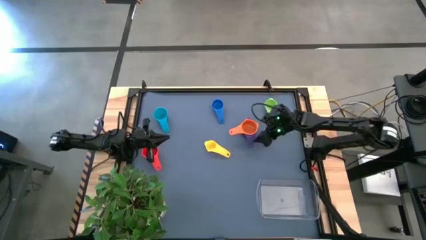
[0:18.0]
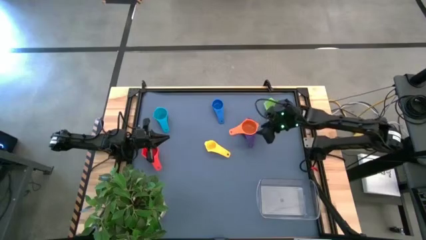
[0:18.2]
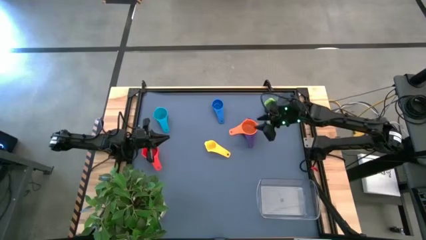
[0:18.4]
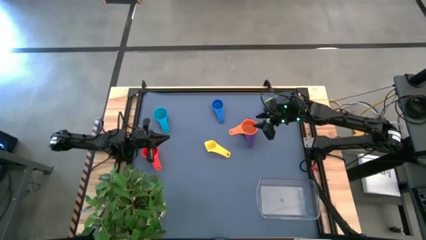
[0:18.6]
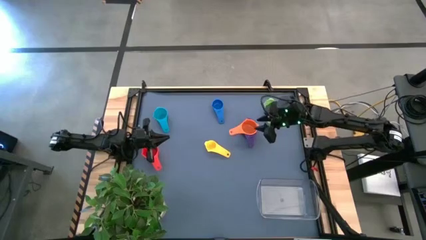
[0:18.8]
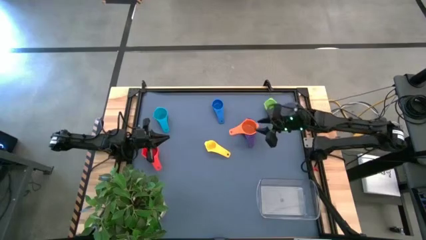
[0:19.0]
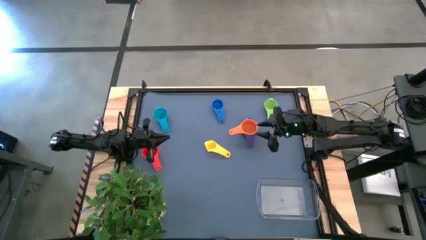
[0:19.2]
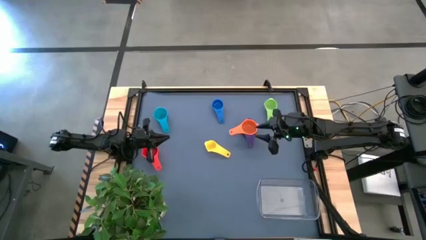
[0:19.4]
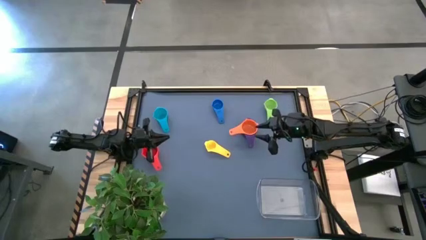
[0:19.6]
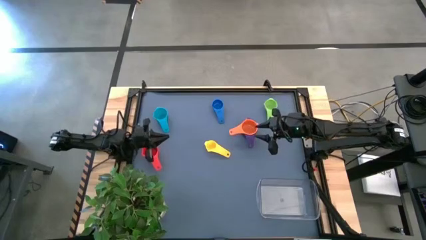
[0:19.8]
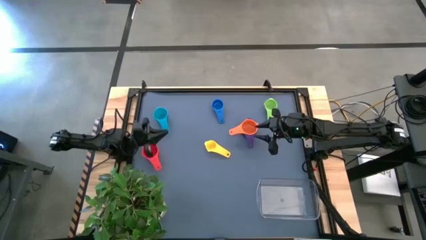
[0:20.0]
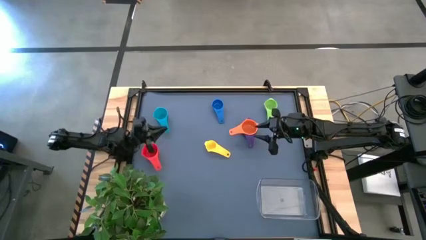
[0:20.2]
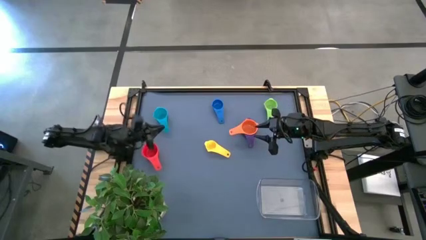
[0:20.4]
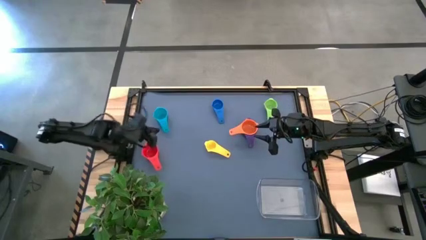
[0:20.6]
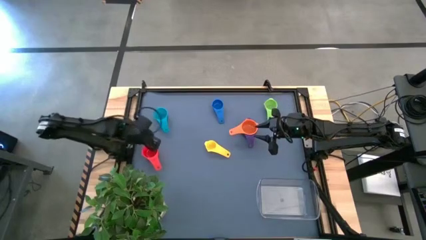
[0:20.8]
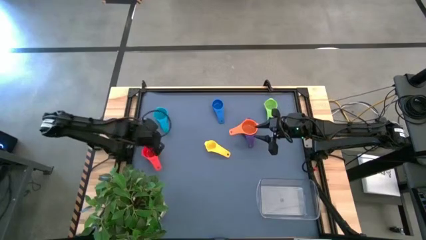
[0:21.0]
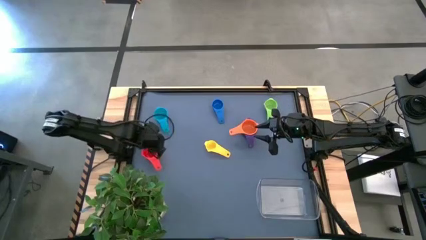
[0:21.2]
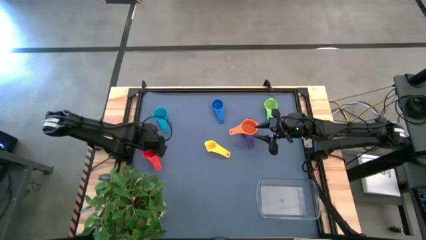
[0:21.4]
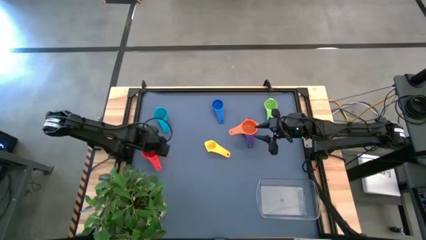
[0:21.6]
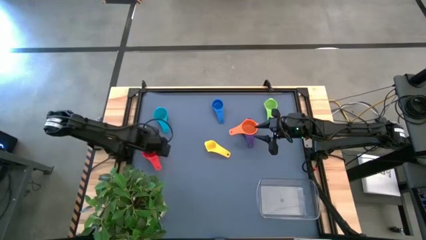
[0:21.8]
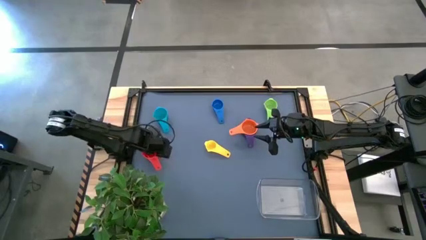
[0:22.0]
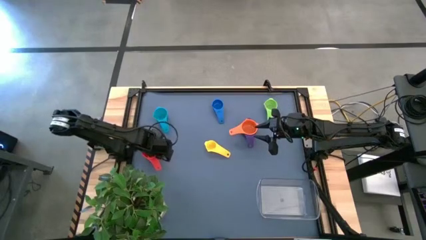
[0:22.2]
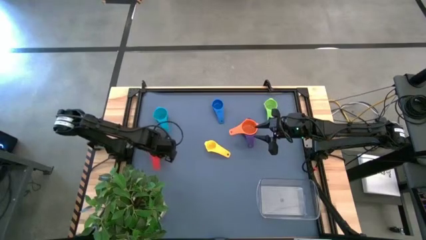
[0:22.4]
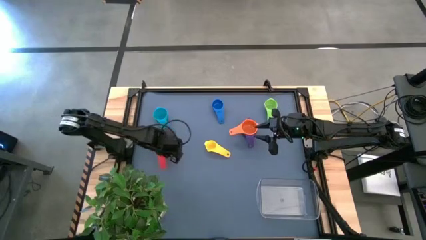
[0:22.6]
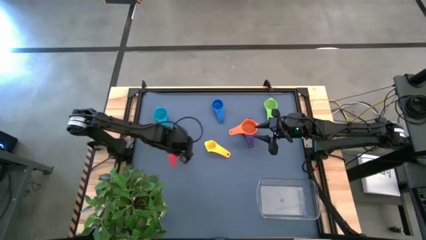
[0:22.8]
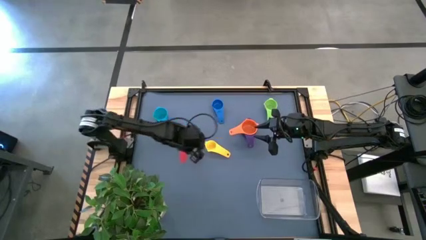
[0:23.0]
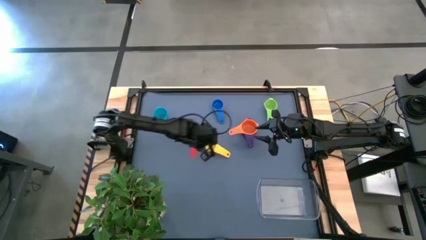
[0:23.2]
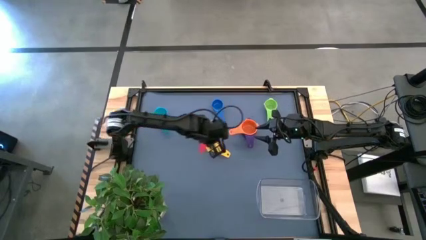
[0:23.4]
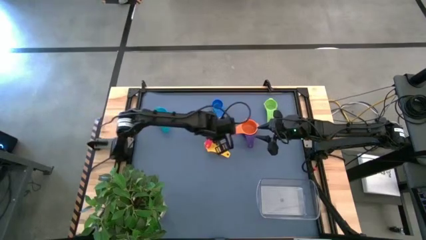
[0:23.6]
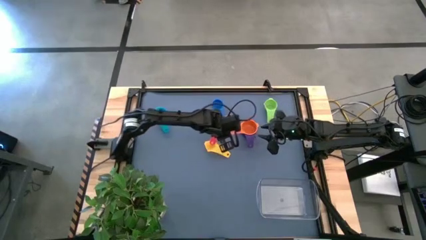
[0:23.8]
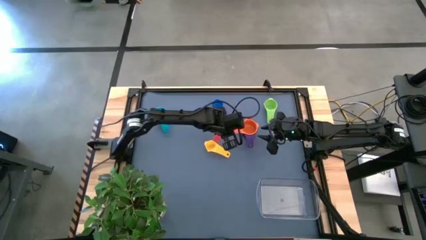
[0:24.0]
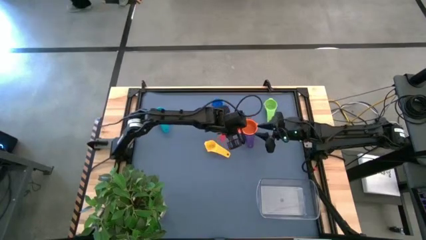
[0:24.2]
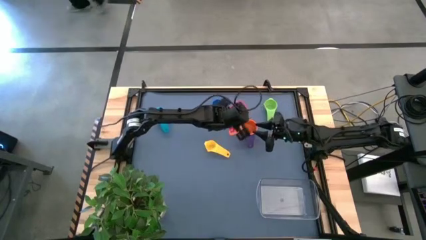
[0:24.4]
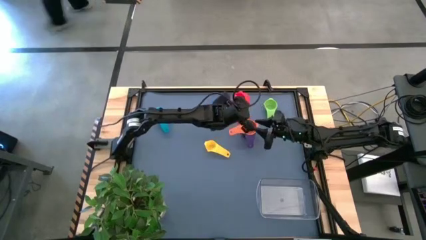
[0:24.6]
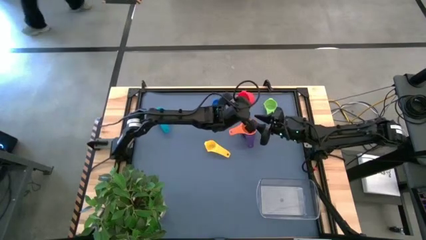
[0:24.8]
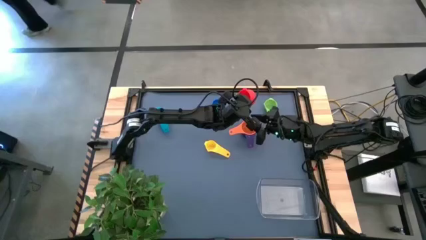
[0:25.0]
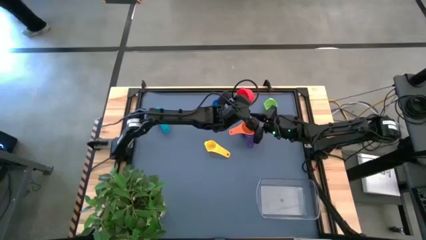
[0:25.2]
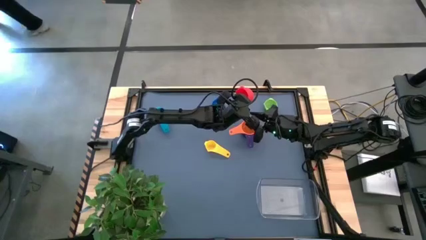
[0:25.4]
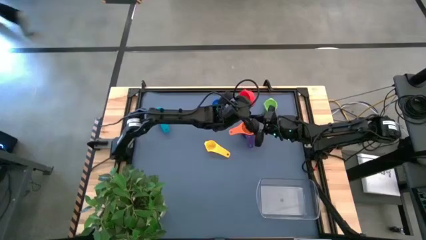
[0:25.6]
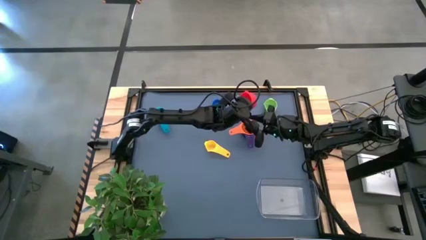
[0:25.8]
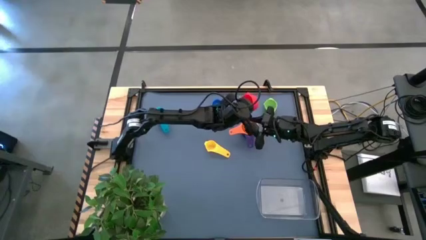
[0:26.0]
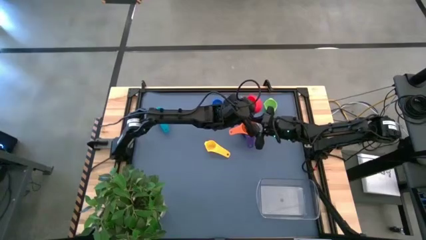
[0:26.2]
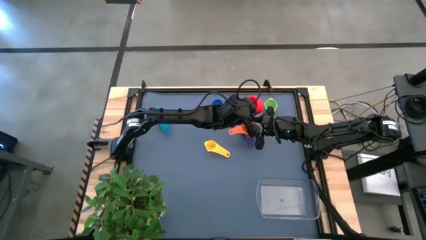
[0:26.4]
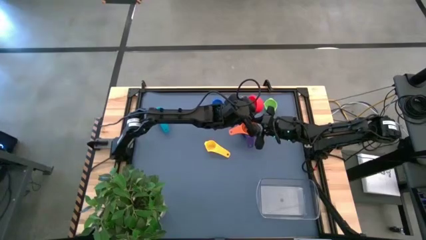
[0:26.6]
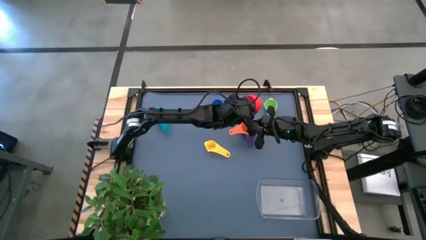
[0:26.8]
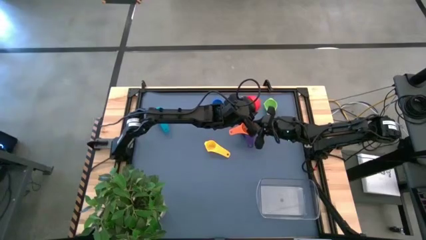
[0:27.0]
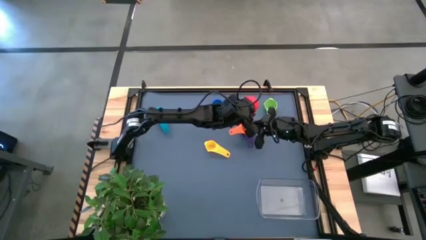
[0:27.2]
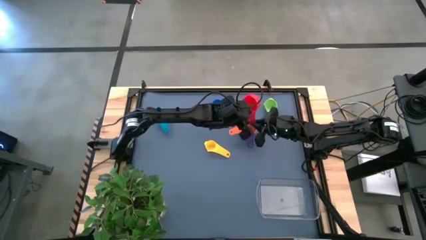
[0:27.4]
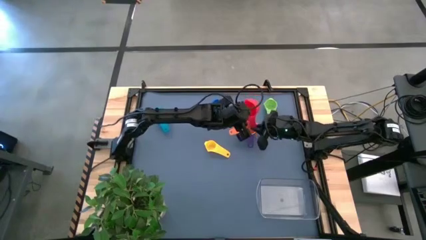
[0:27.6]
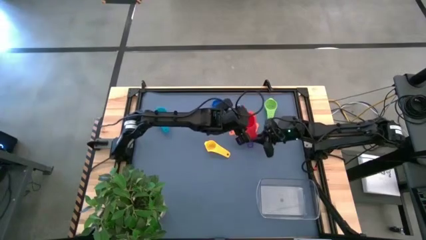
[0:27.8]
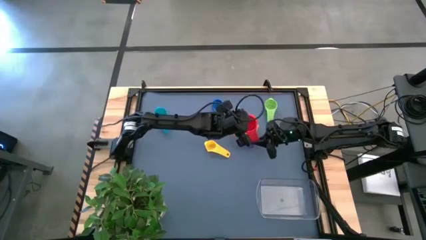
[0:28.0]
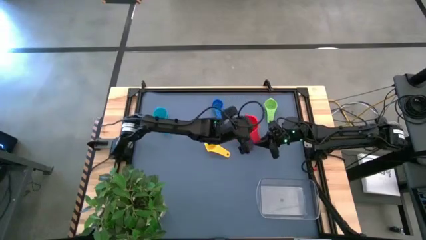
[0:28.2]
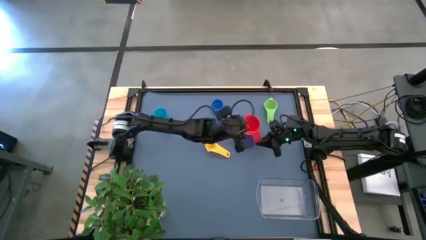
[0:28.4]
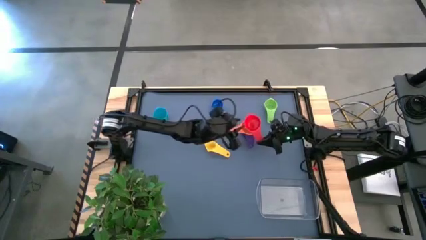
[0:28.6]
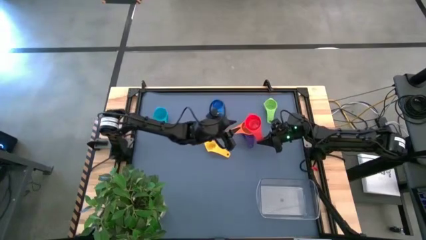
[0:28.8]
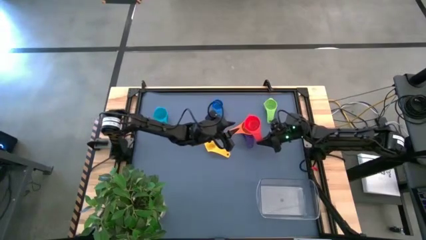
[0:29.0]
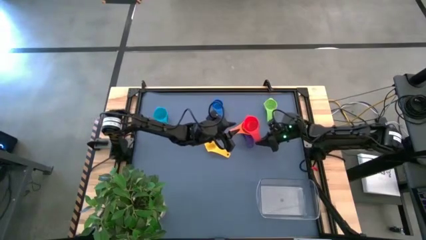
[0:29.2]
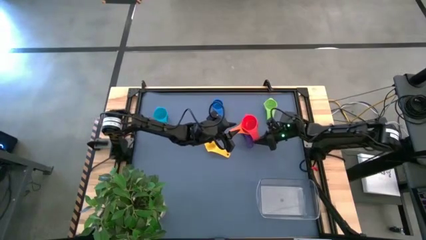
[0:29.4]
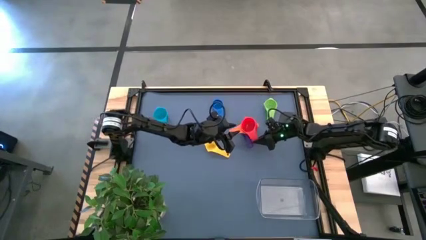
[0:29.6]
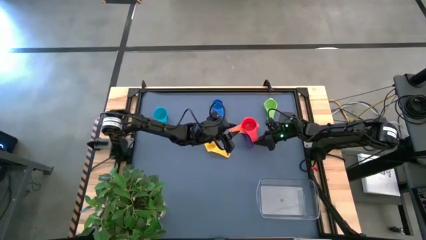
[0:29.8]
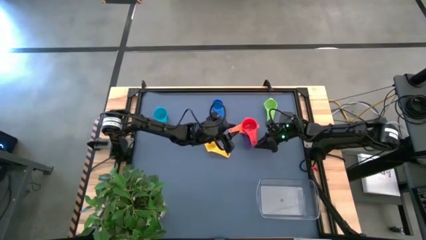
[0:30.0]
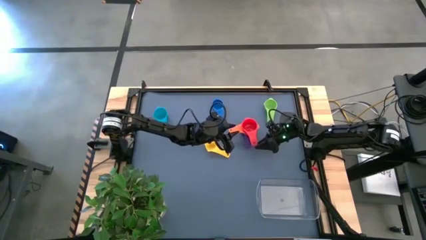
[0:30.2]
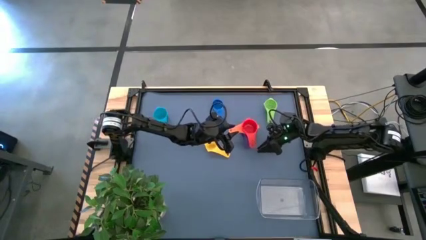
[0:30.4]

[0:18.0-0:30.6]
Task: Nest measuring cups in basket
Stack the red measuring cup on top of the orange measuring cup

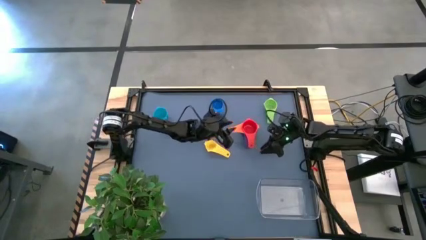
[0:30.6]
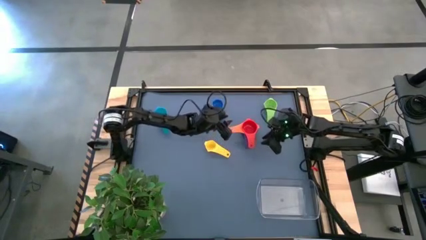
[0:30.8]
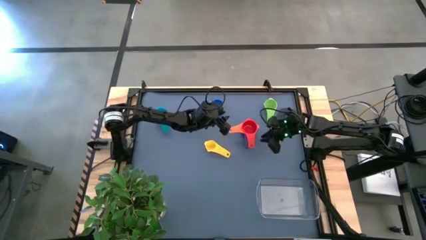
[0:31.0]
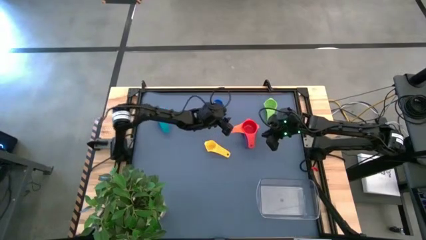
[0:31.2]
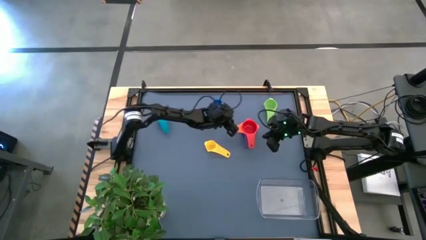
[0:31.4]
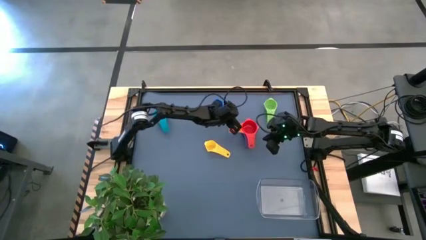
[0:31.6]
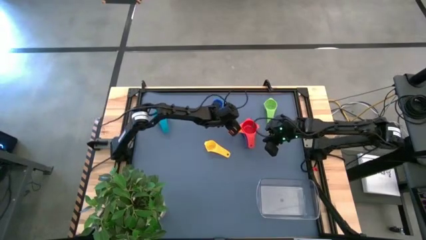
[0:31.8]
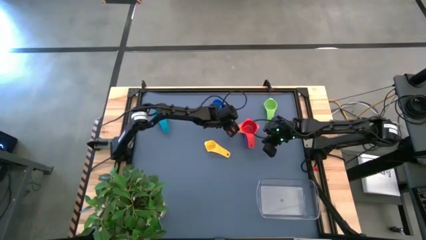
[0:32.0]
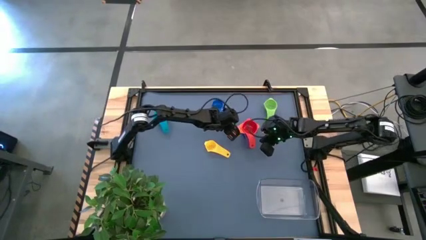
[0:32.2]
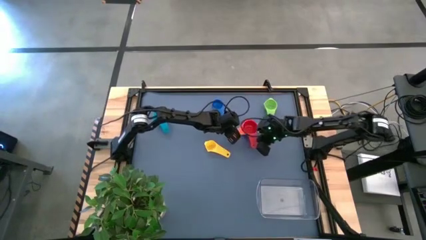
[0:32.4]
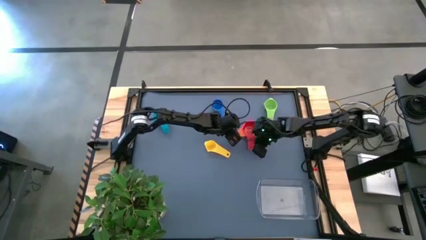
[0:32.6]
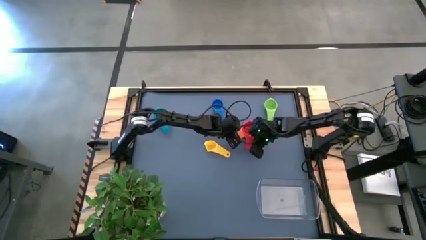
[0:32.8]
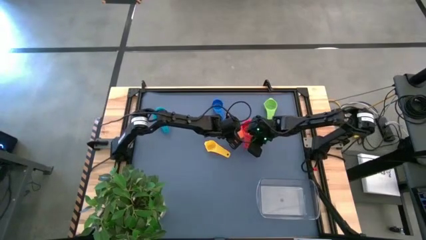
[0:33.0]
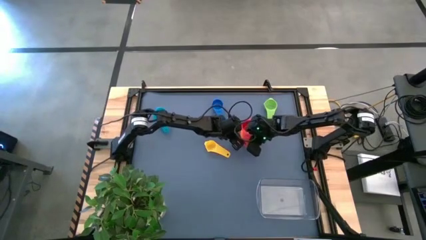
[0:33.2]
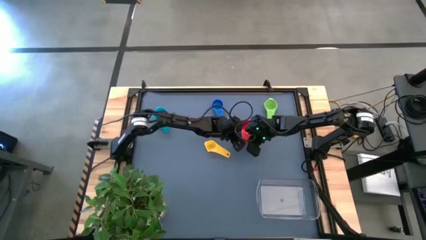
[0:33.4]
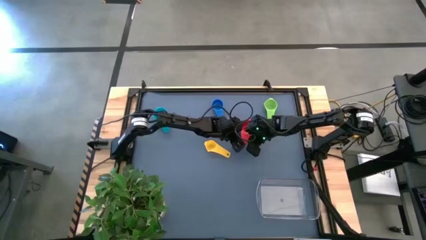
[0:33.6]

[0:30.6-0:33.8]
Adjust the stacked colored measuring cups on the table
